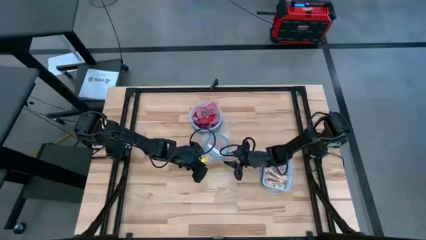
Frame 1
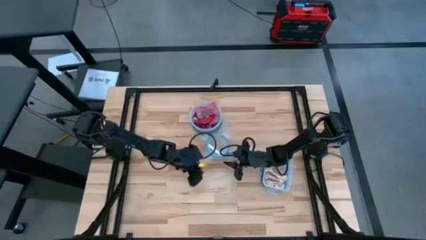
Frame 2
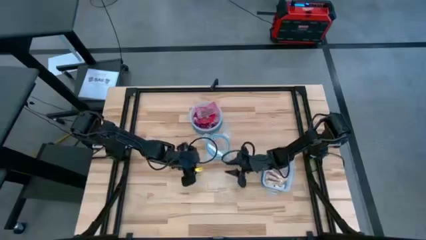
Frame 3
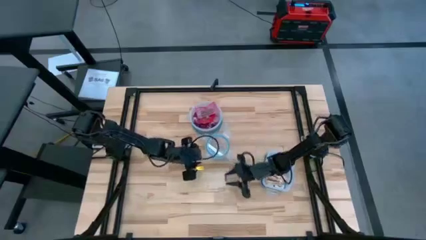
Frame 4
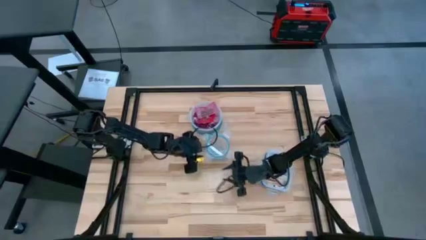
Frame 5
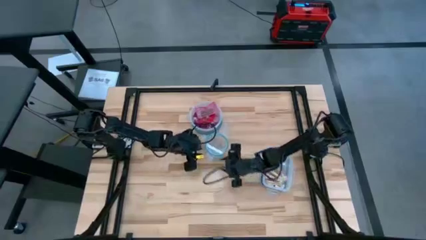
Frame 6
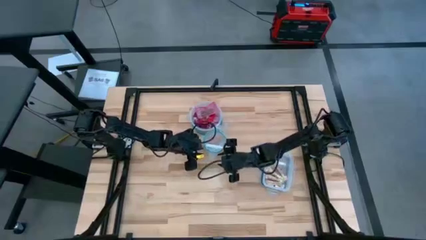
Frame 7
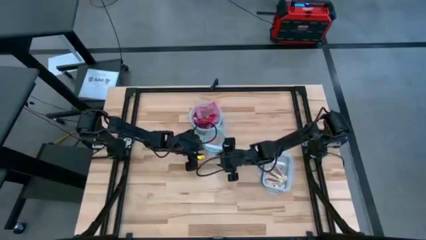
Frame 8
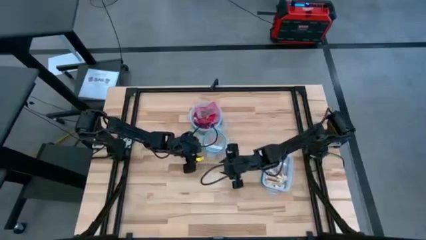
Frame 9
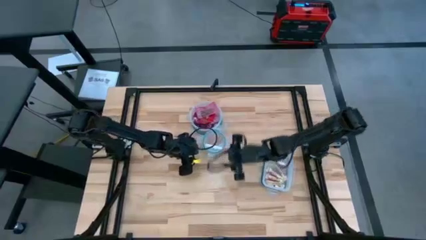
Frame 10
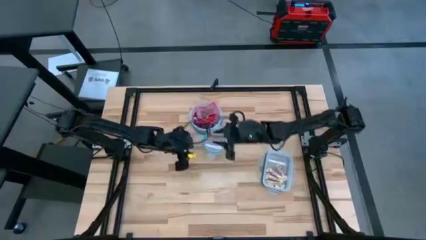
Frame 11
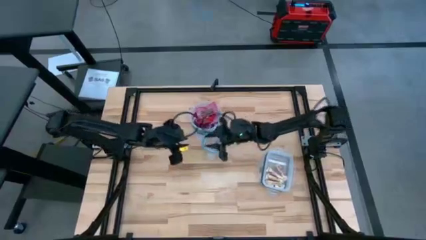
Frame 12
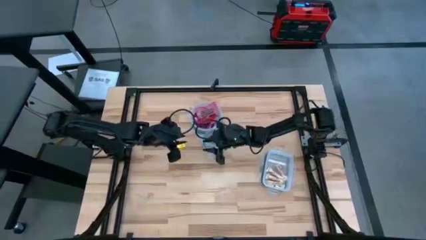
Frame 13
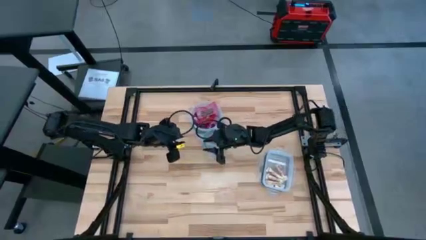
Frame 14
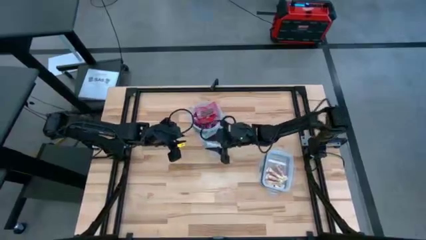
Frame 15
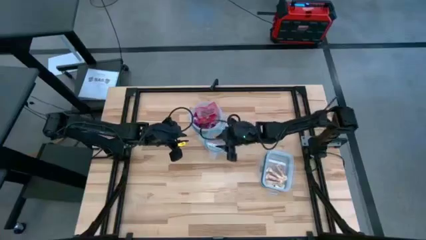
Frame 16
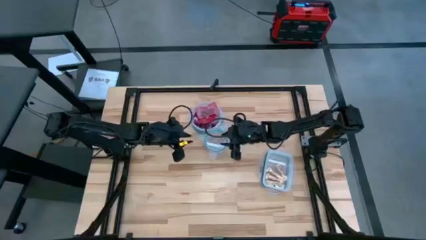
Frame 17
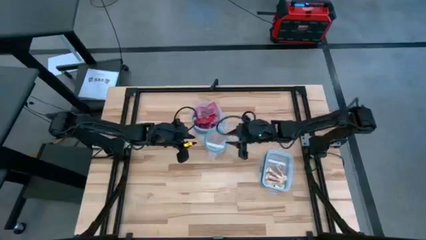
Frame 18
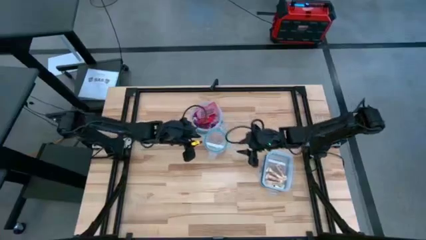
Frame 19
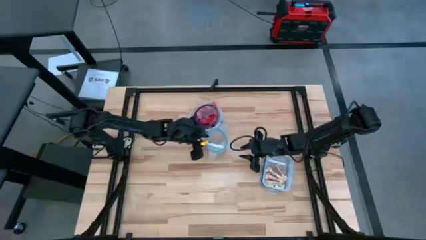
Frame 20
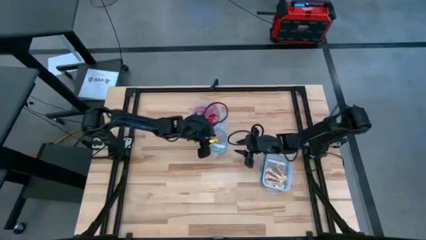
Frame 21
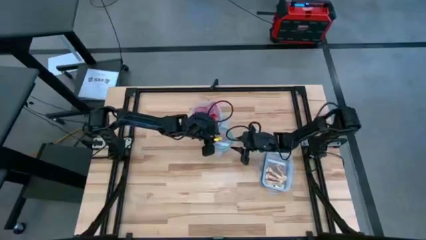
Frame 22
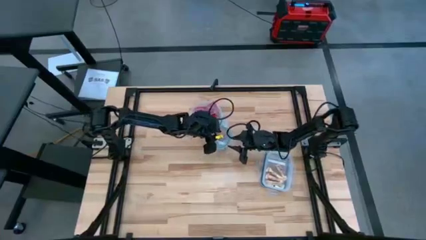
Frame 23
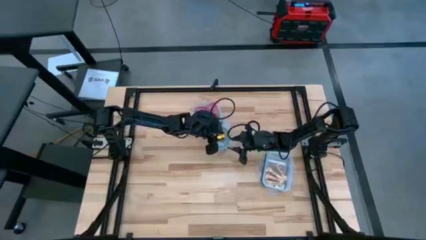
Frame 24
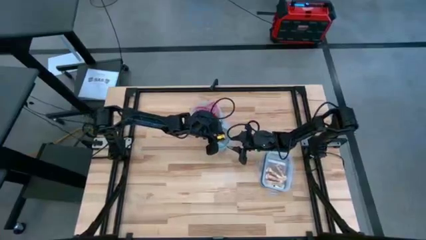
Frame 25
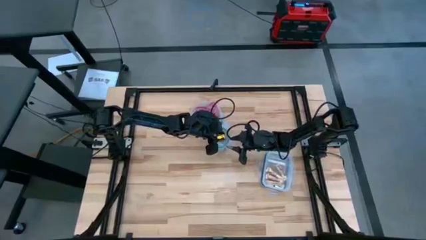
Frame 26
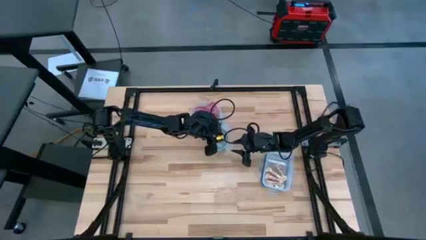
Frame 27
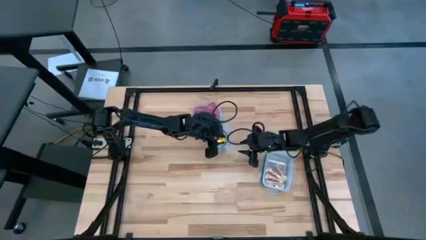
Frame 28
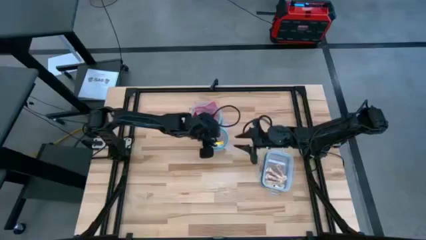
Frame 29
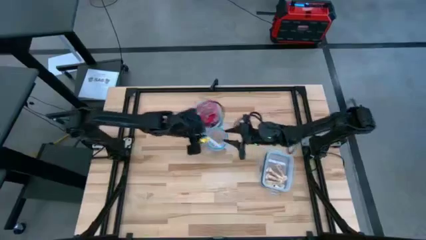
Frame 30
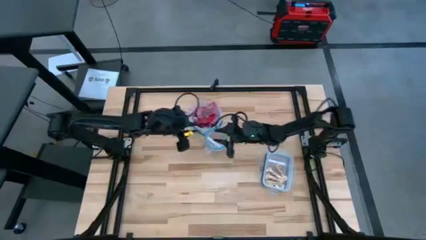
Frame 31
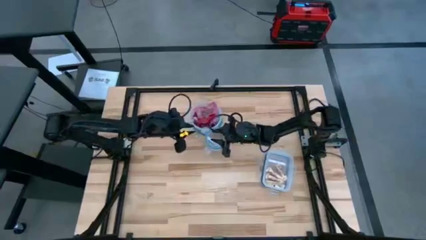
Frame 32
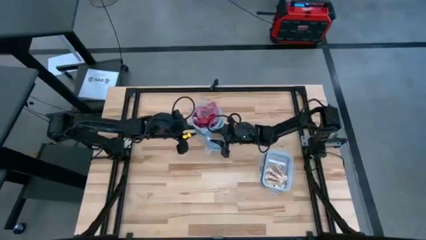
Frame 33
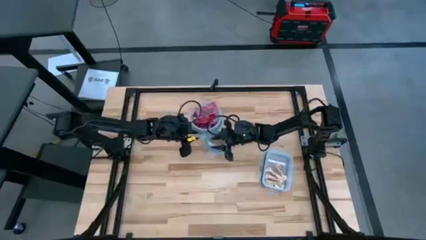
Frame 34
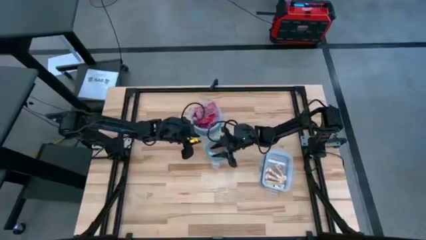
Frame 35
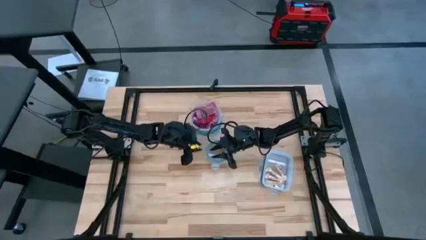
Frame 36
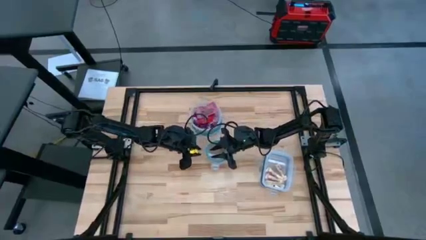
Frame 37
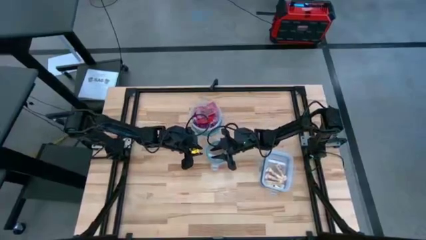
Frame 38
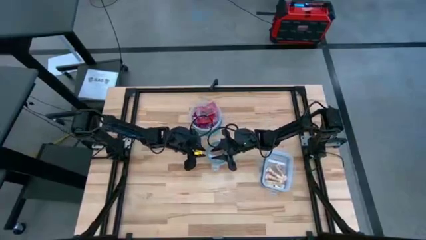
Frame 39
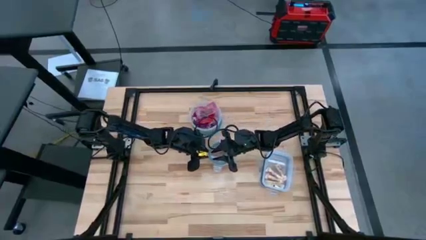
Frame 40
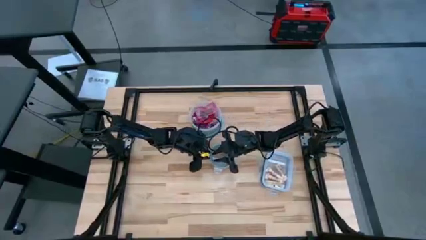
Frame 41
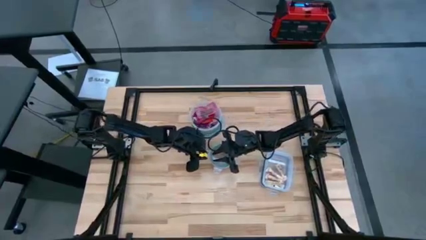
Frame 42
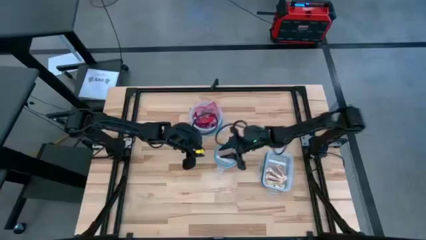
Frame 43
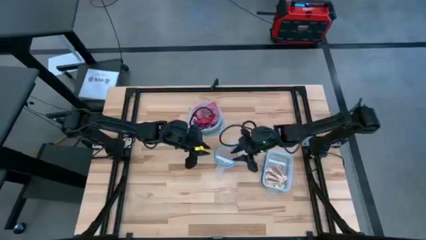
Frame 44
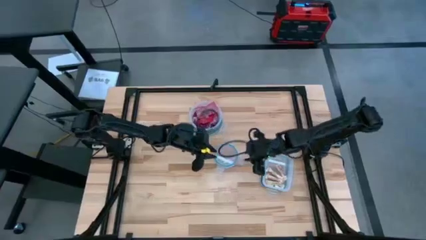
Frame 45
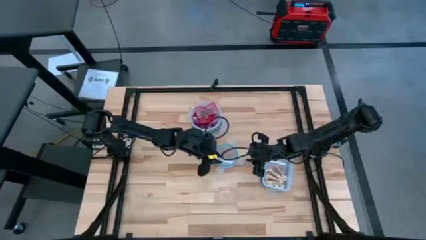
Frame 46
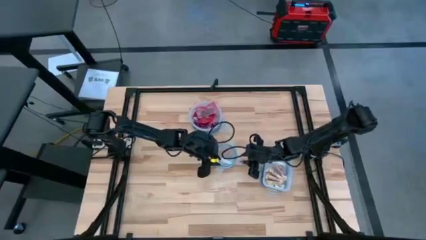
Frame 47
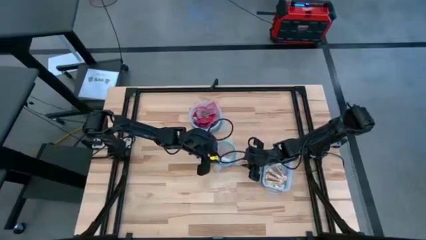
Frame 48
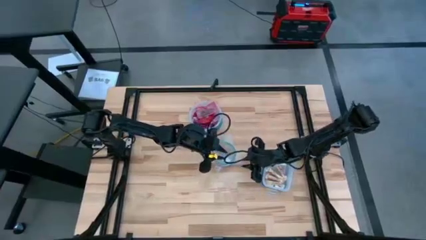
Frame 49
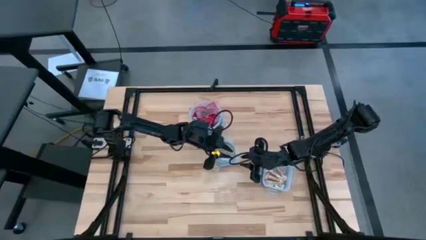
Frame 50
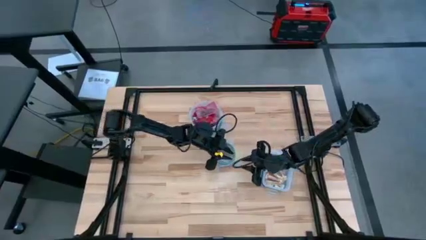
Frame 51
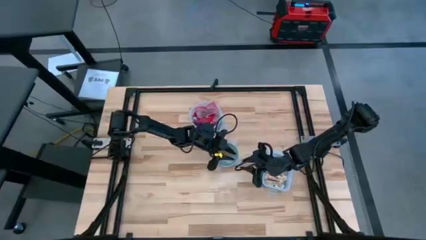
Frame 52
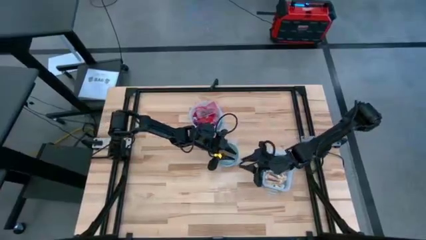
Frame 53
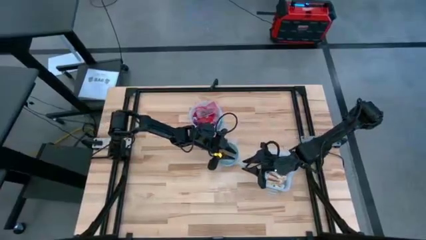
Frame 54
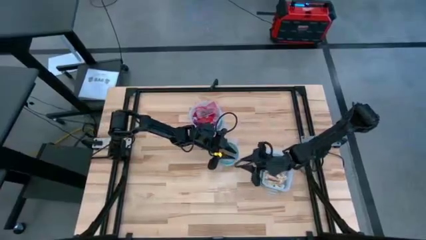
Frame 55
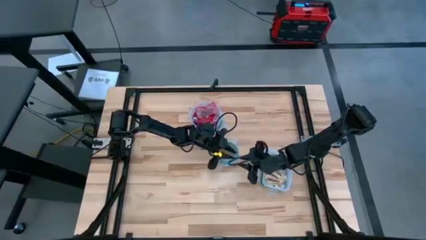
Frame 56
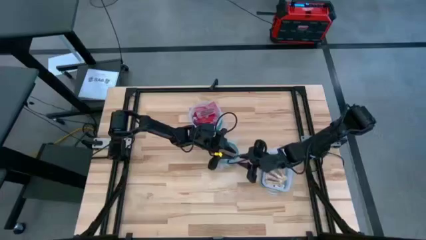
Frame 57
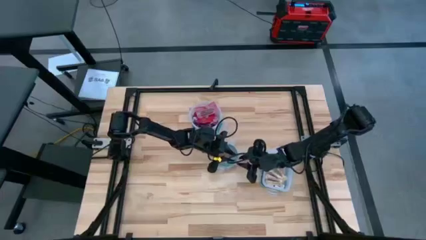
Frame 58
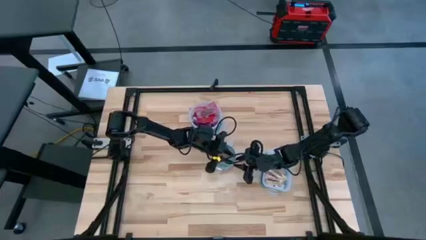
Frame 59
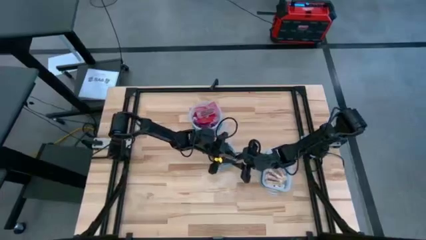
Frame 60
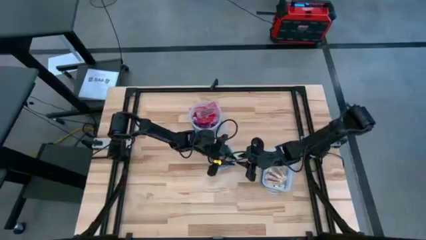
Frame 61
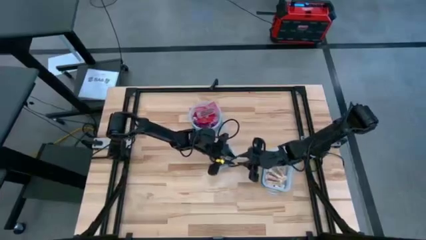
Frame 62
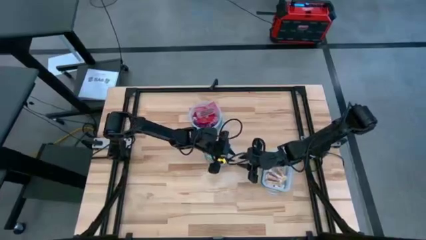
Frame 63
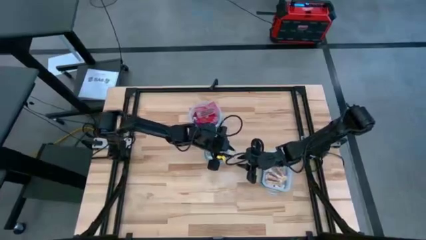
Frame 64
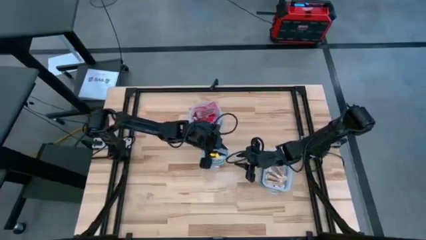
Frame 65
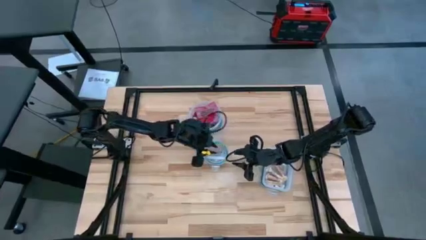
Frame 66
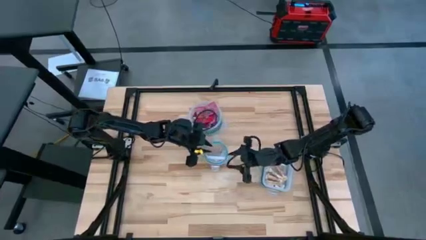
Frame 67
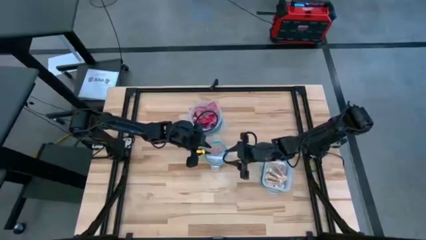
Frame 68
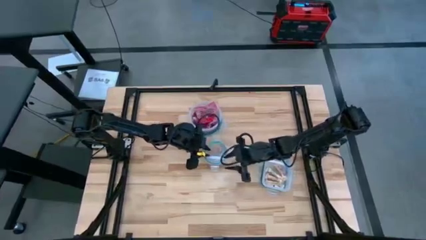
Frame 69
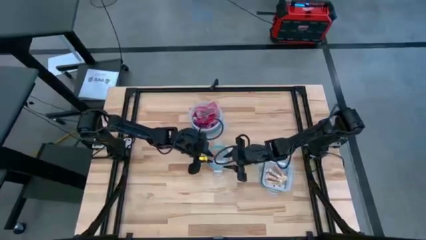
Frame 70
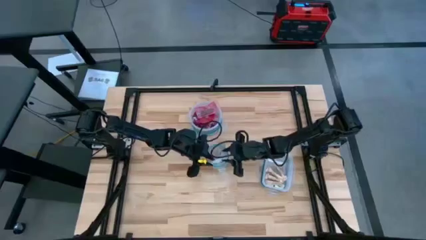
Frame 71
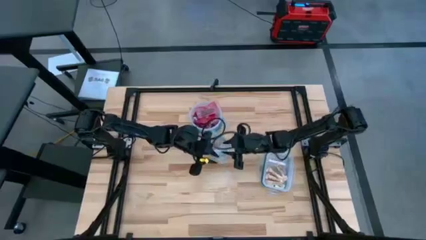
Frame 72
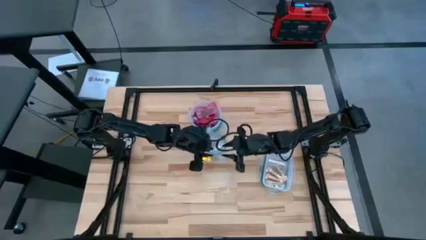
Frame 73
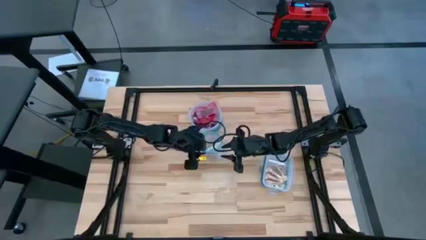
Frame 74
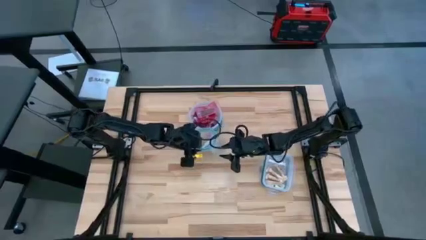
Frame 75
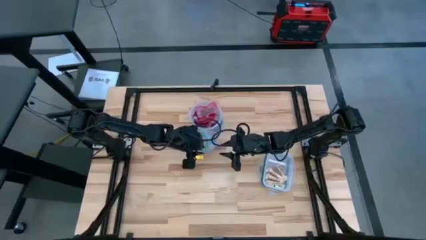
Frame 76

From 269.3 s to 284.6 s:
Task: Sort candy
Close the small circular transparent bin
